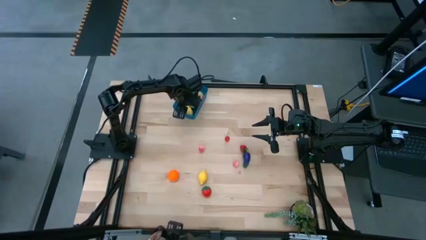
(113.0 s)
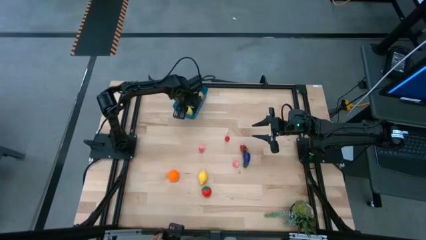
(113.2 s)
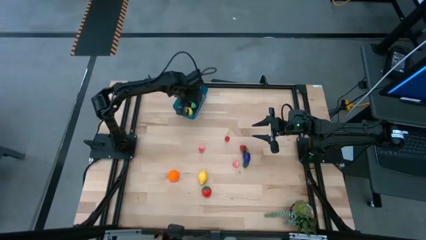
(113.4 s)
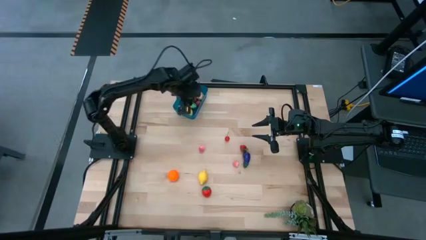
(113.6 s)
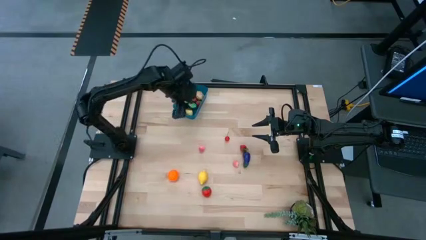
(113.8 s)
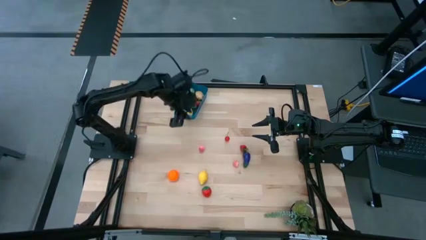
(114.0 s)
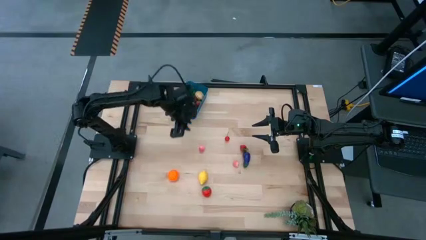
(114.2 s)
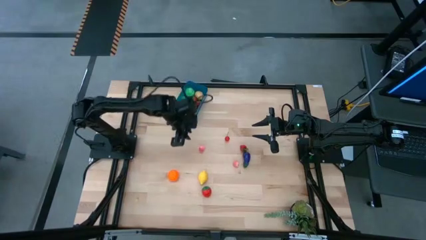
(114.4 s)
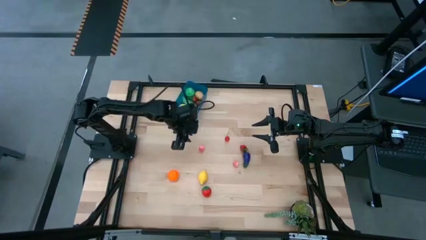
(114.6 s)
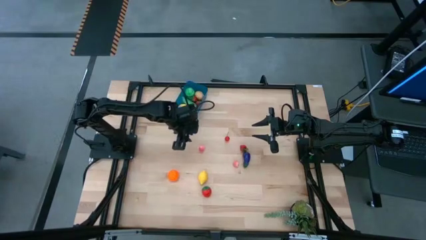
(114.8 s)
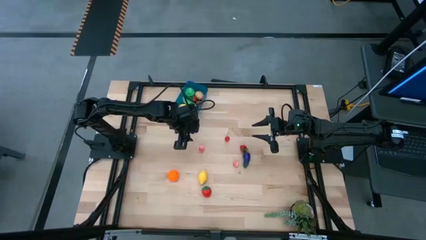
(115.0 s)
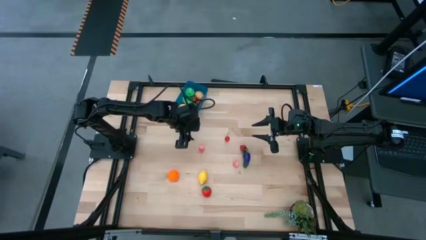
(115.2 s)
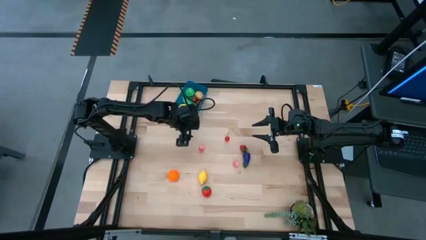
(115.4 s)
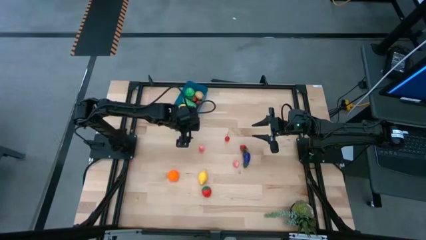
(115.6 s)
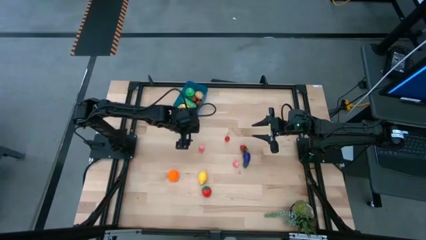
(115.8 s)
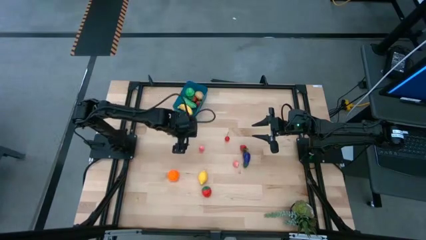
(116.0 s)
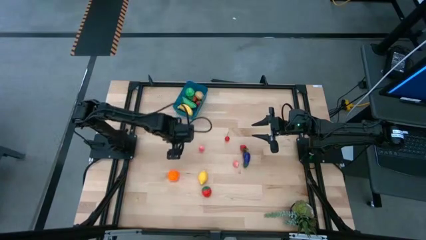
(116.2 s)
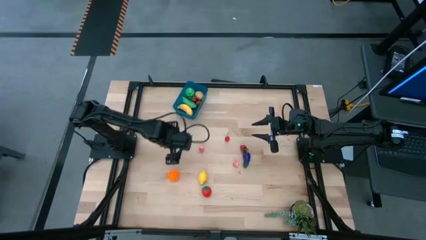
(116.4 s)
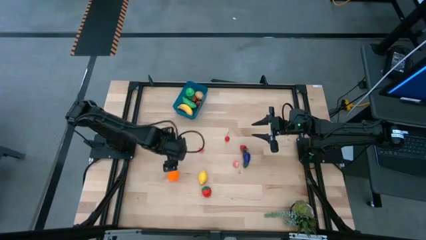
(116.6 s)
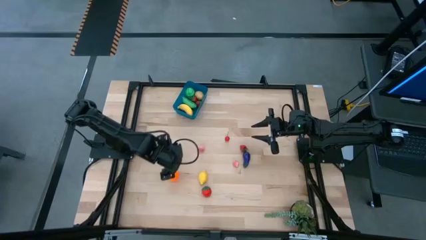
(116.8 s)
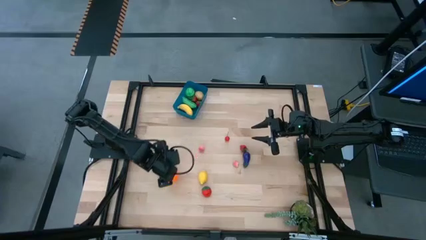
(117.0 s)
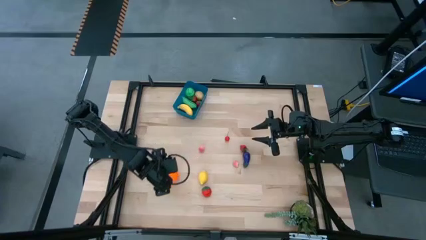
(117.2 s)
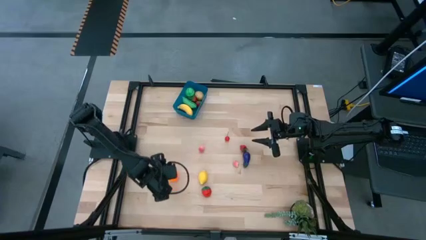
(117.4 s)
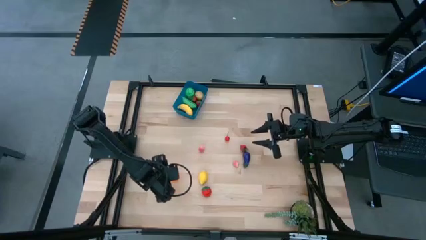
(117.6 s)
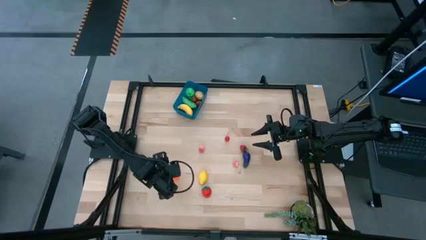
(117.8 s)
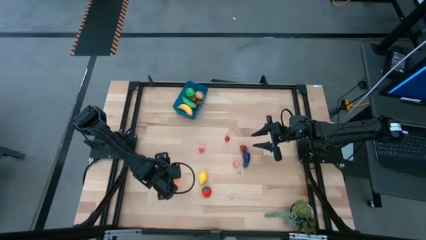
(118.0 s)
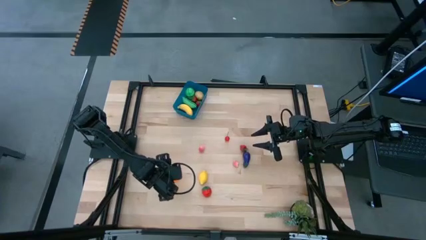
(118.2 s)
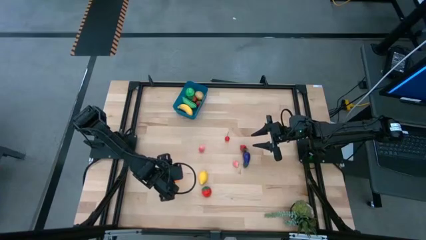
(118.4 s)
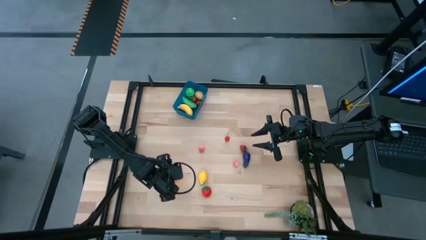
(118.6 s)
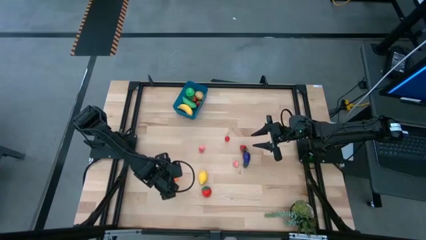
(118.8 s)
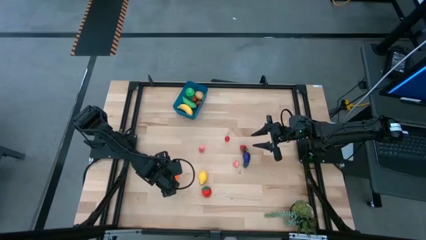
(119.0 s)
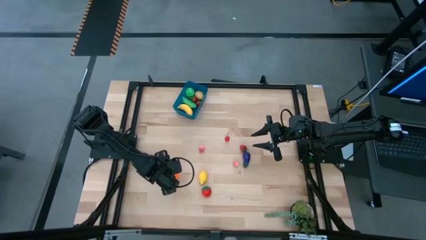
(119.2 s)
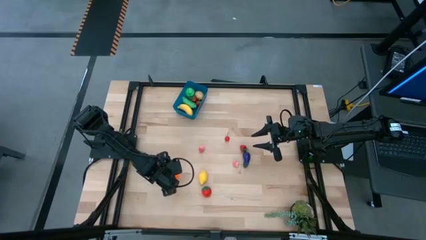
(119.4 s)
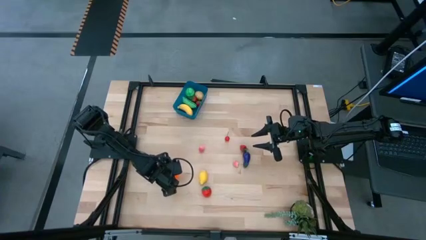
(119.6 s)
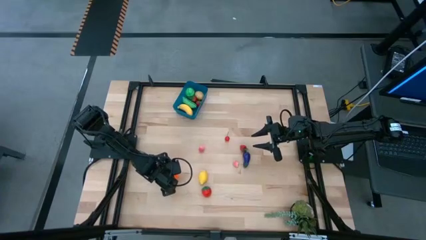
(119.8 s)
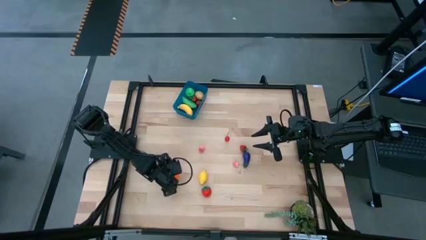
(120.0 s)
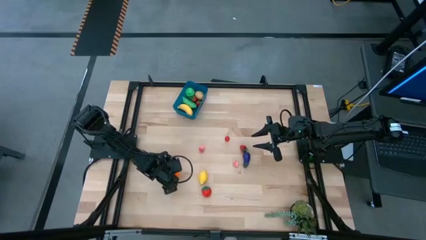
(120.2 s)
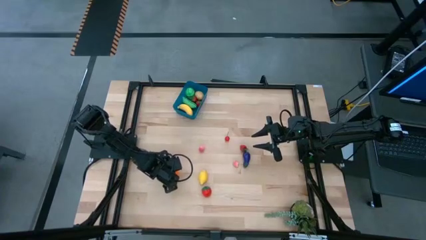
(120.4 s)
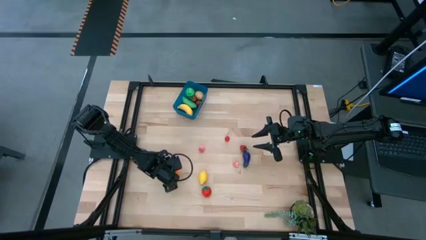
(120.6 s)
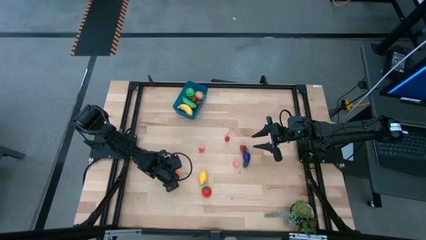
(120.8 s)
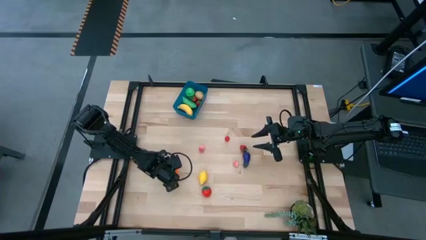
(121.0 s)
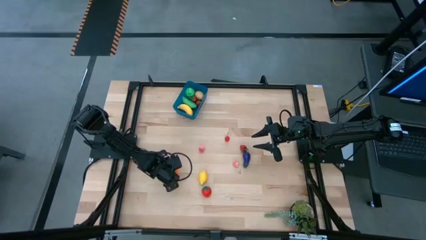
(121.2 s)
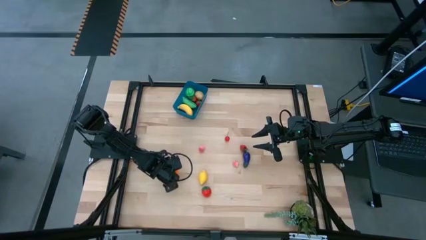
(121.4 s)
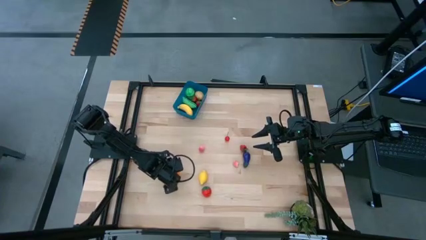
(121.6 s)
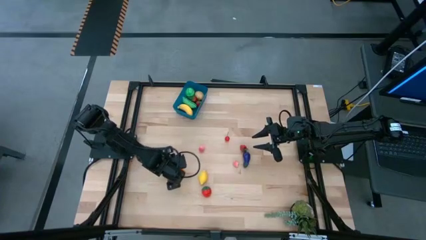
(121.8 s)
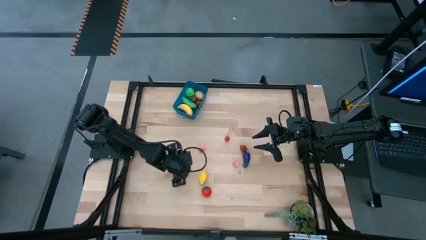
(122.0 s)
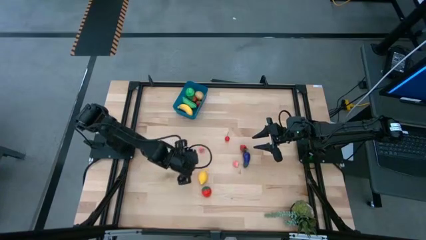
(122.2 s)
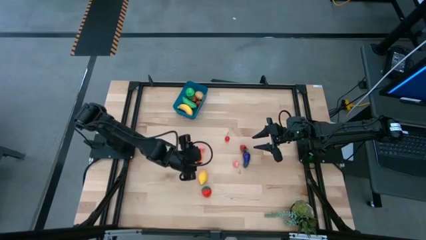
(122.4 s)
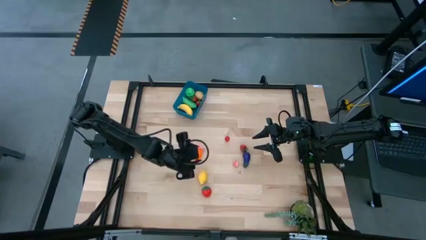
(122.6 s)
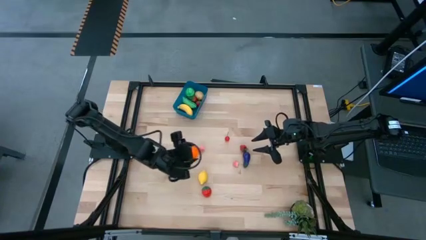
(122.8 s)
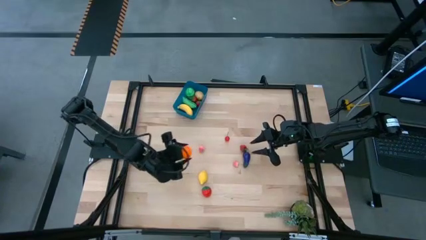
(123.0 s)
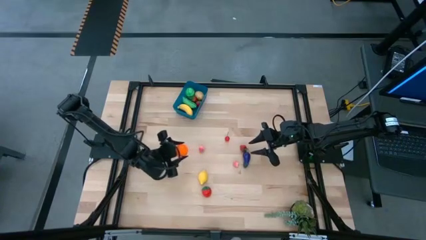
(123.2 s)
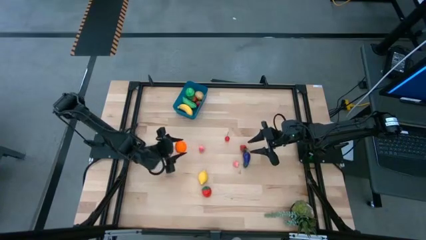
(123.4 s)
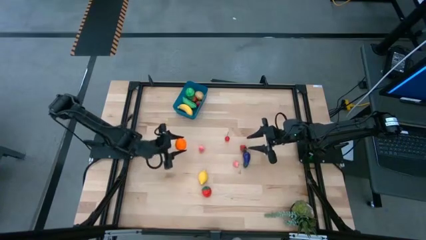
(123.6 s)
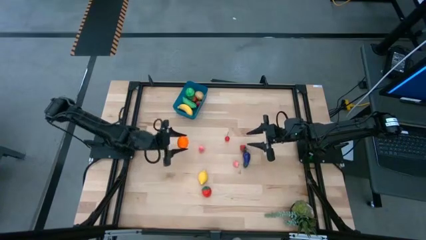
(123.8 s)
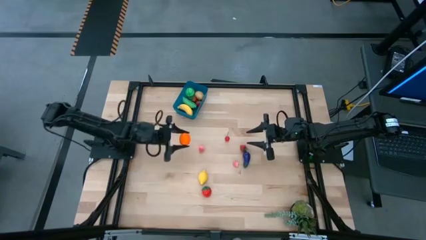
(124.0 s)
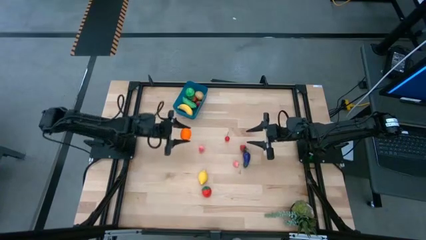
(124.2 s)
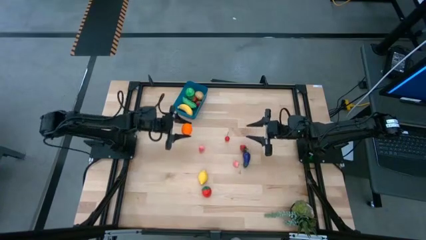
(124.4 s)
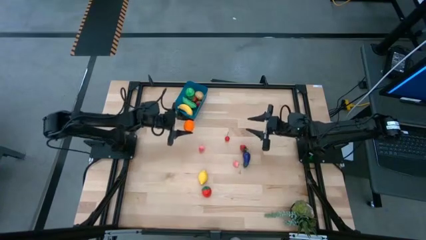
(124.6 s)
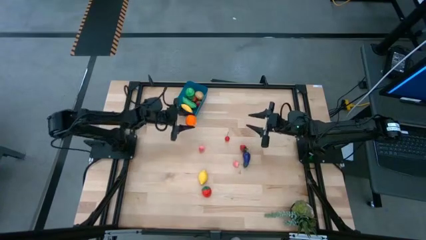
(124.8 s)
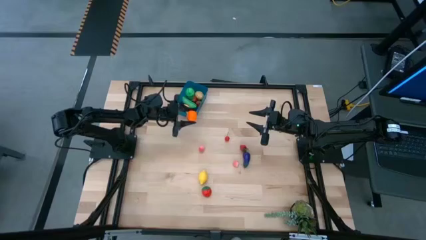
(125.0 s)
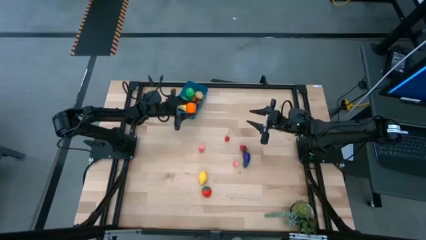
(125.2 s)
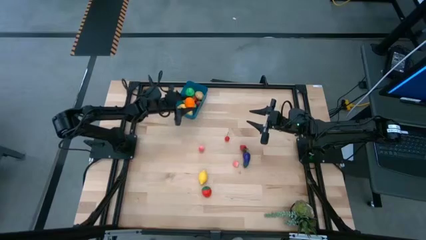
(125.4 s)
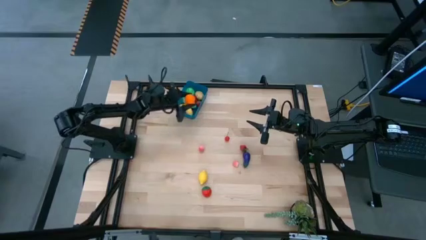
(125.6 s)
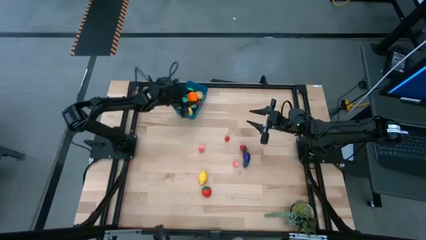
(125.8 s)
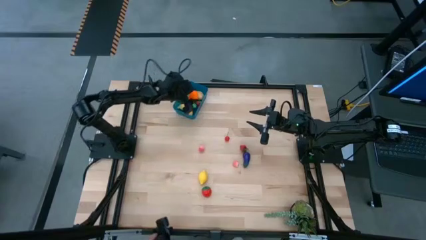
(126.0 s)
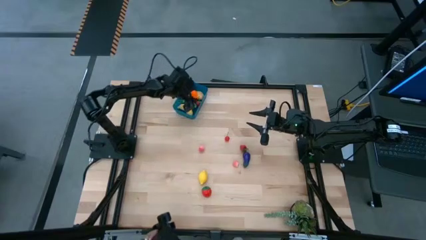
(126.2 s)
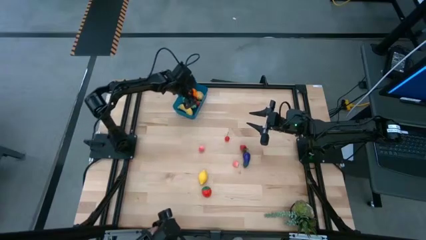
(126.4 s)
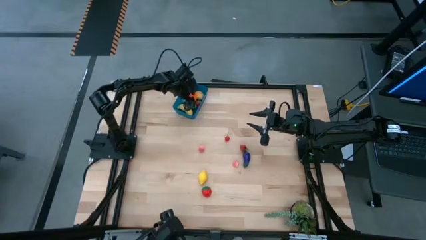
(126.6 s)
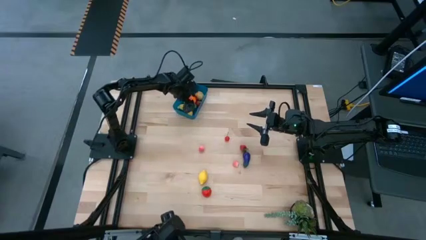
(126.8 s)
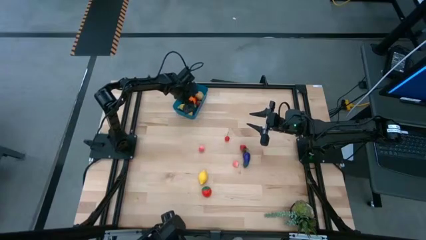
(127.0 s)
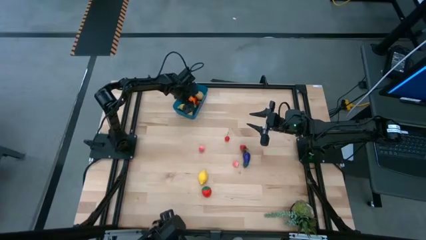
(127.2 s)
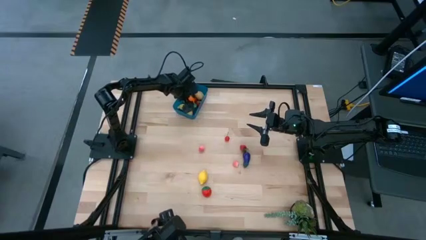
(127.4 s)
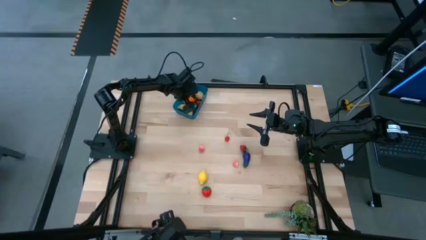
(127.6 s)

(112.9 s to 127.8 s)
Task: Pick and placing Produce into tupperware
Put the tangerine into the blue bin
